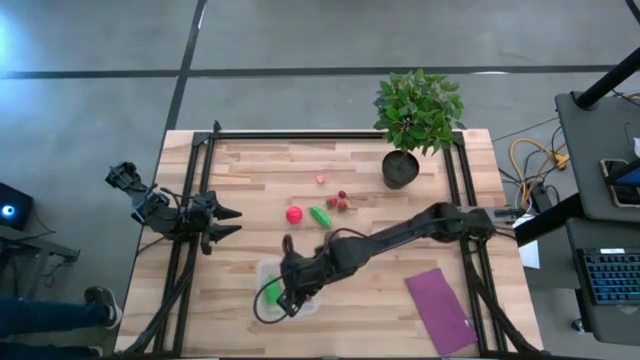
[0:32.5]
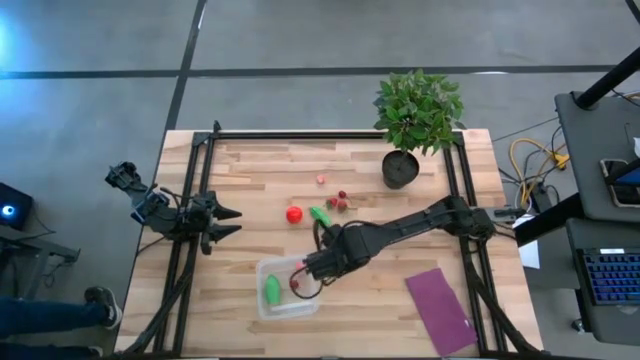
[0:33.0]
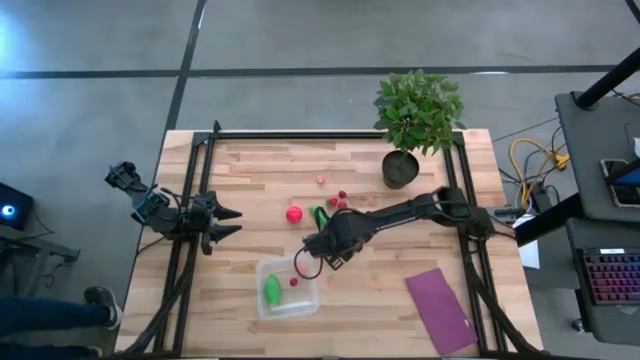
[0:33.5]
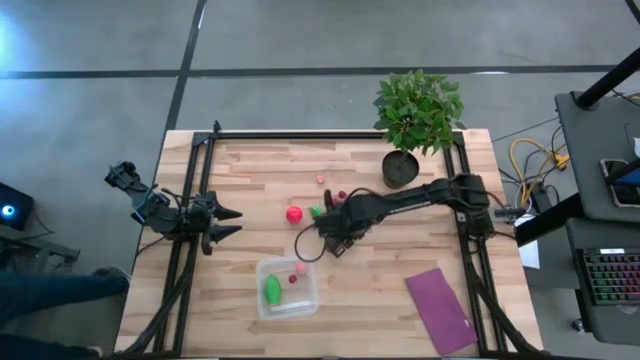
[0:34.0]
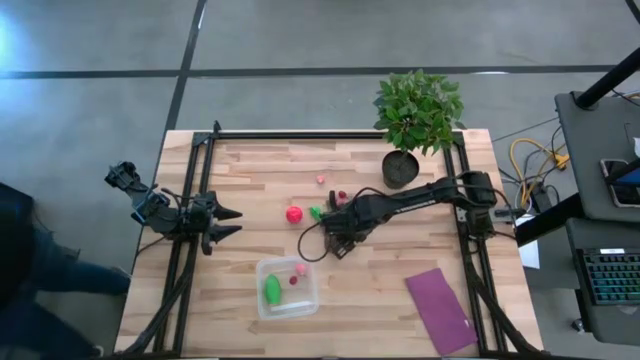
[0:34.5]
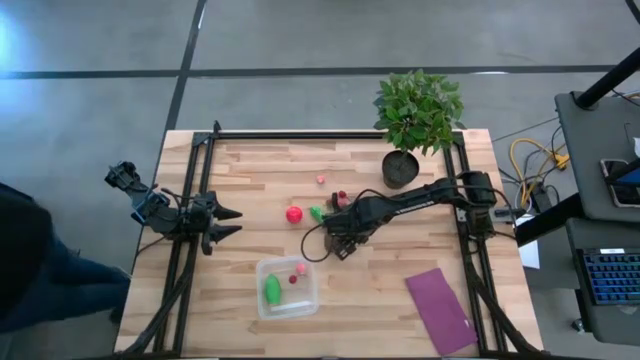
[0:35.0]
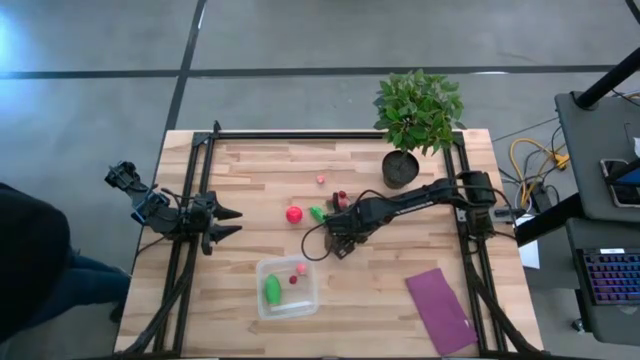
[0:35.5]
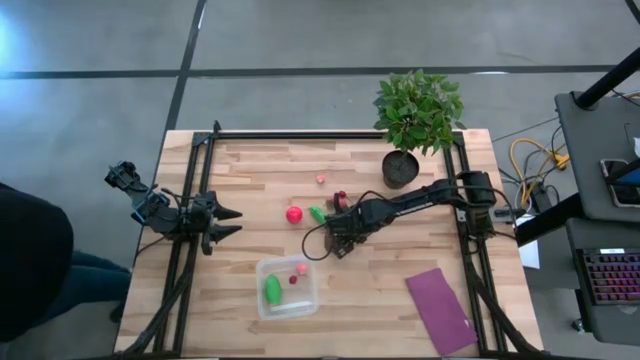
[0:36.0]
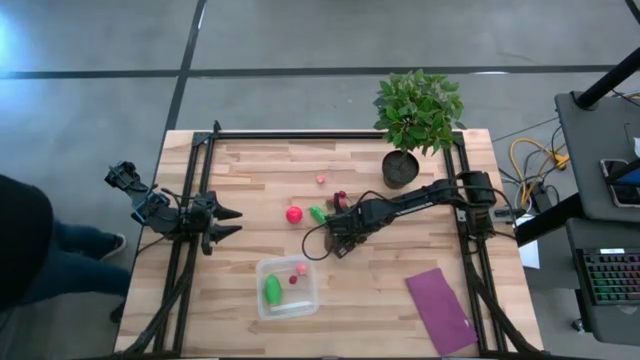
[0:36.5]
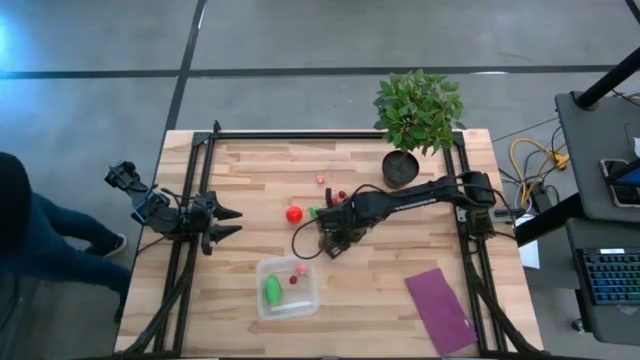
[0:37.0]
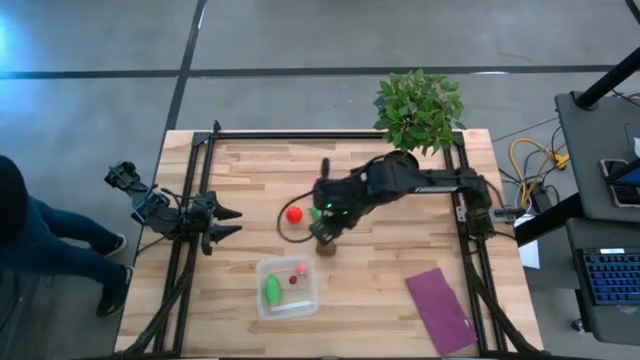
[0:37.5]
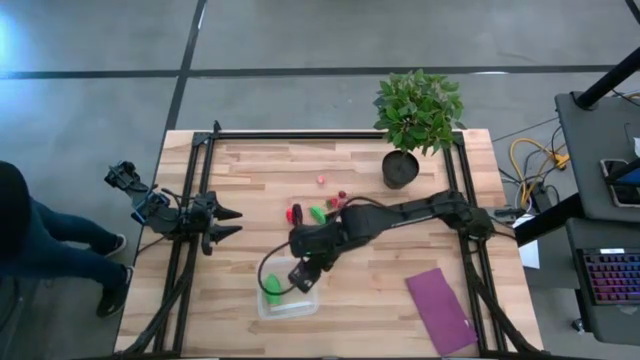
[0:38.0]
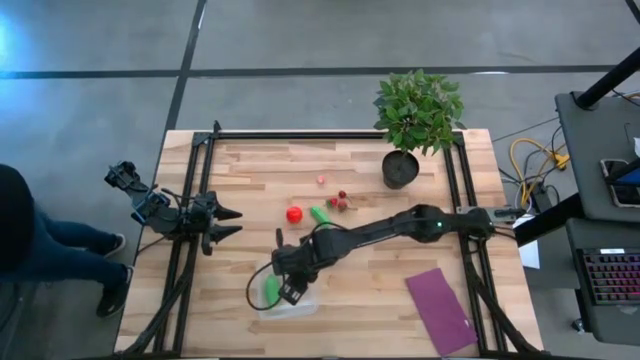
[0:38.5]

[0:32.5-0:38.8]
Task: Pick and placing Produce into tupperware
Put the bottom peach into the transparent bin

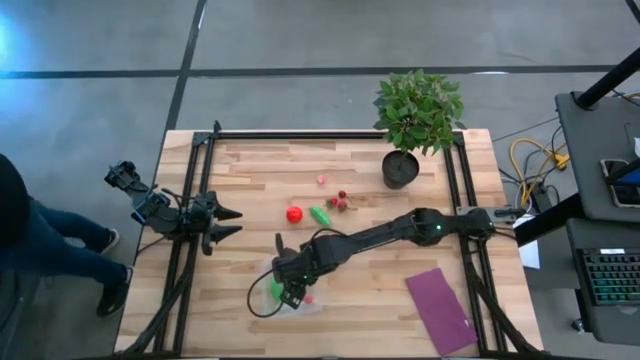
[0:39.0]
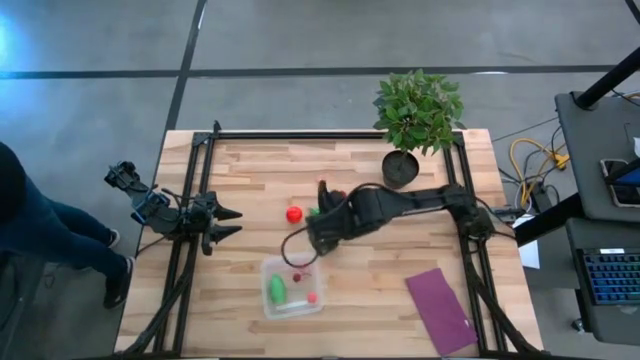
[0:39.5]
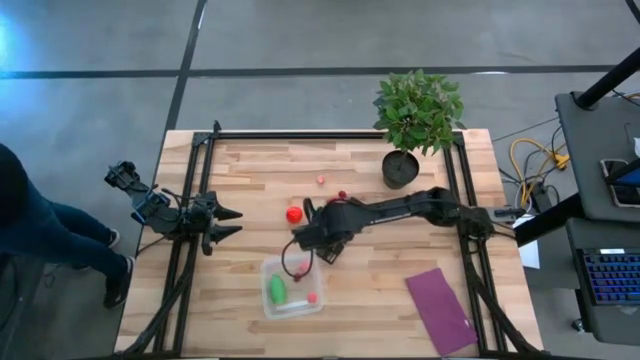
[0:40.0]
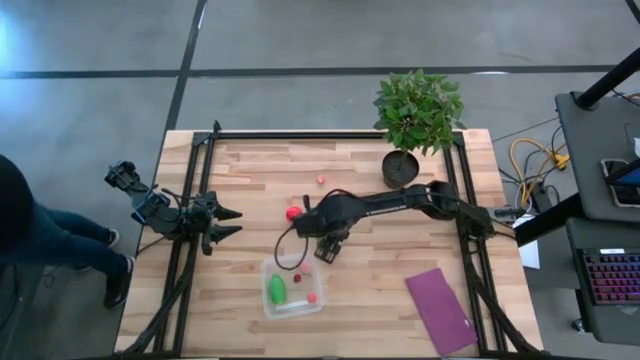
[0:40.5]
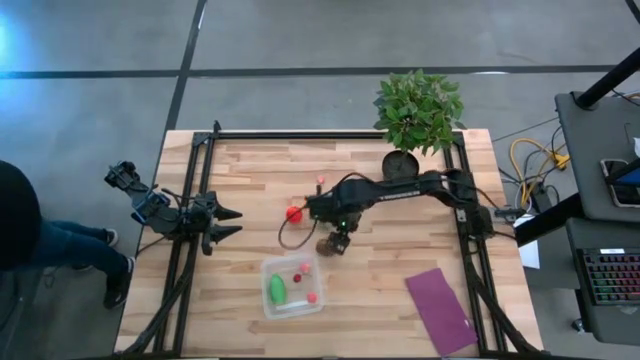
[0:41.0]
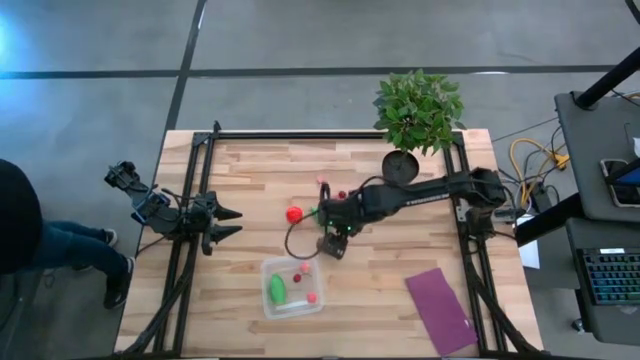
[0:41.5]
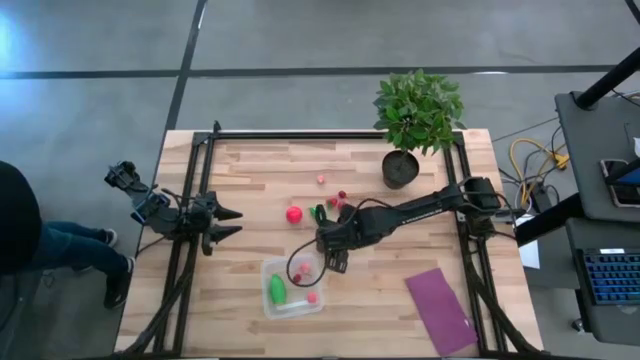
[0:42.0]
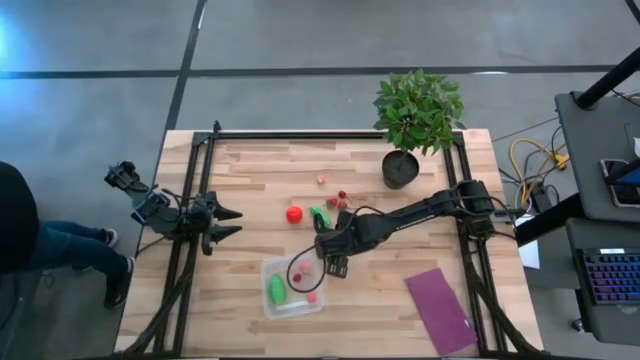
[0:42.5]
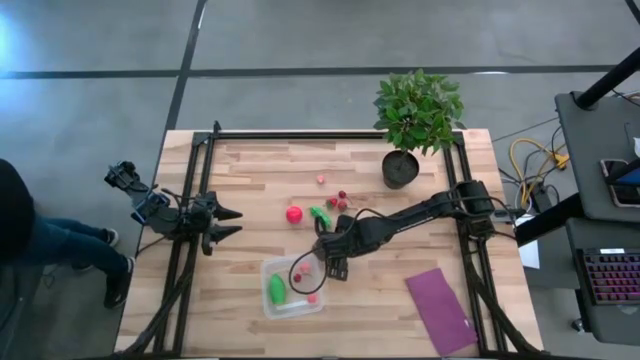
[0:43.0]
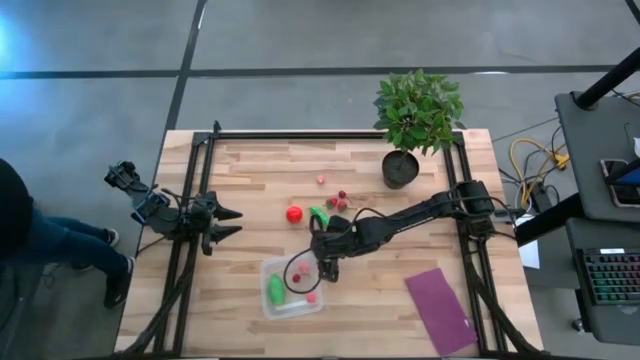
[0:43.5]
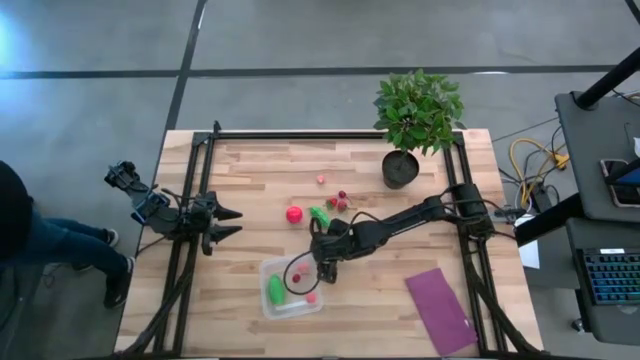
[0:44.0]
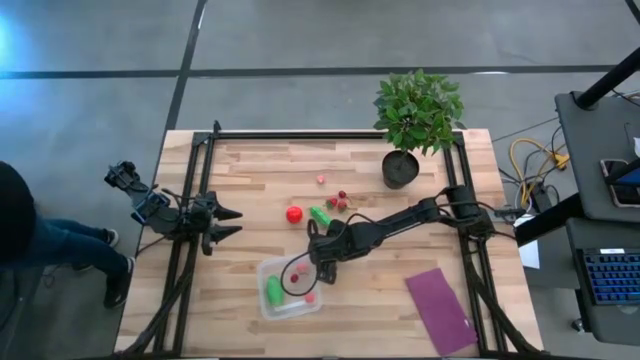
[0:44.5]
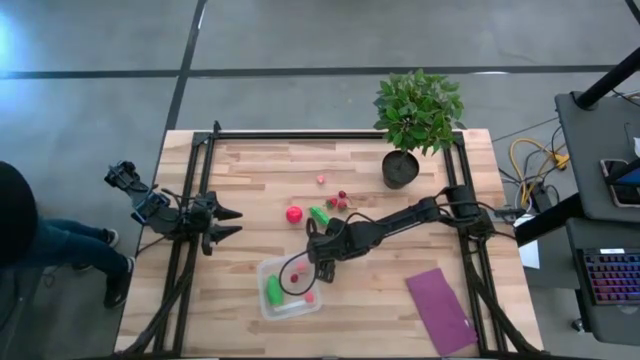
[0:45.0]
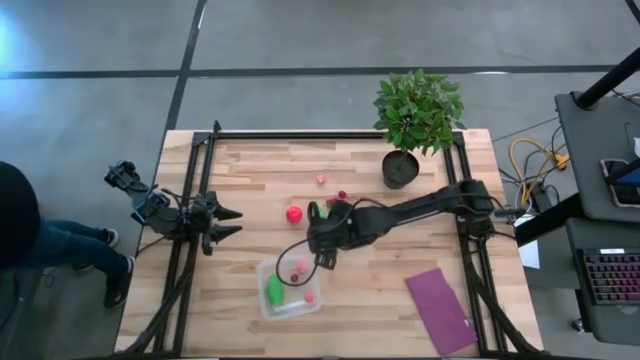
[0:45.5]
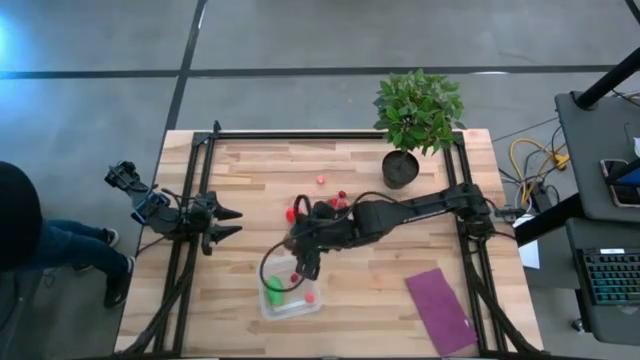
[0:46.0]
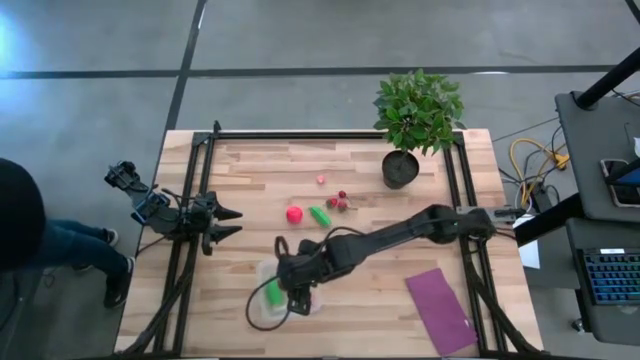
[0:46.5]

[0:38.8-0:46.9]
Put the kiwi into the transparent bin

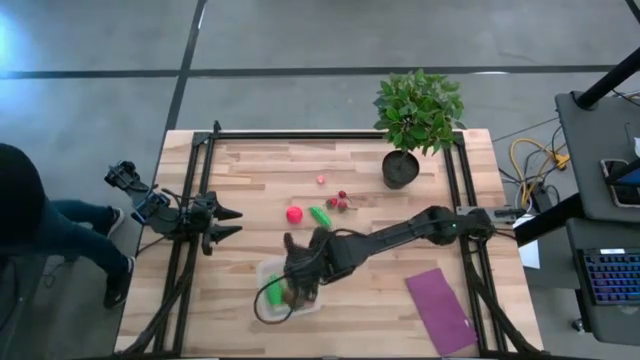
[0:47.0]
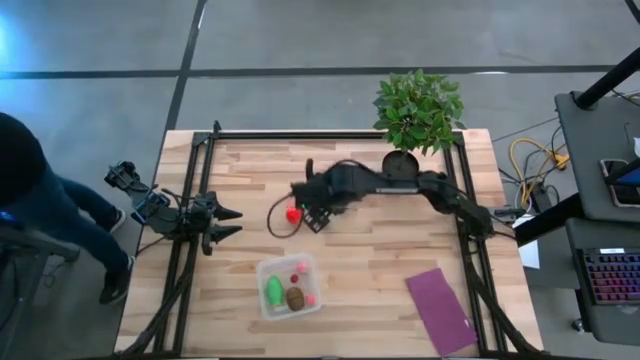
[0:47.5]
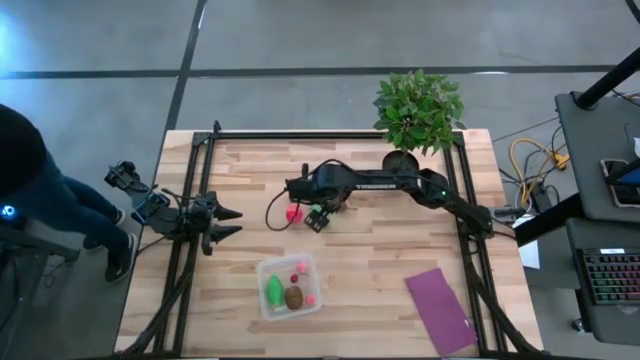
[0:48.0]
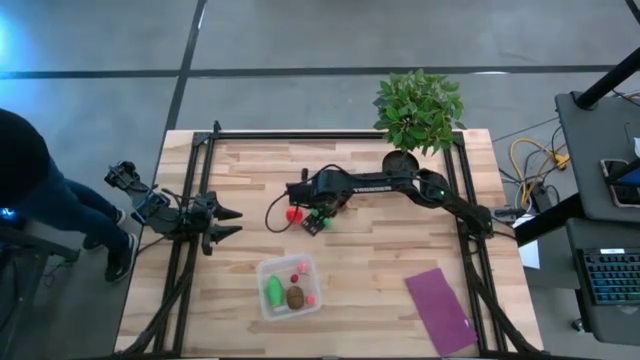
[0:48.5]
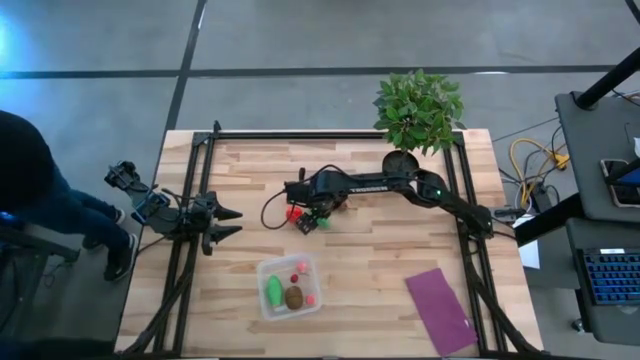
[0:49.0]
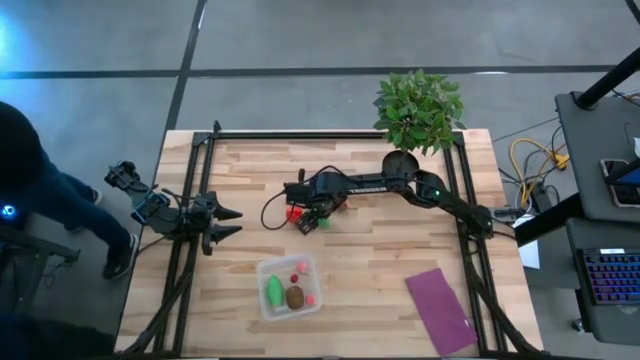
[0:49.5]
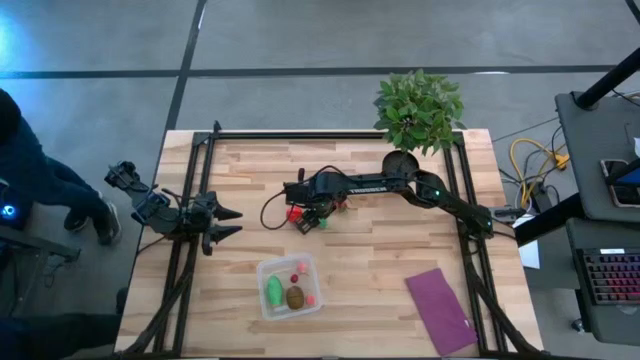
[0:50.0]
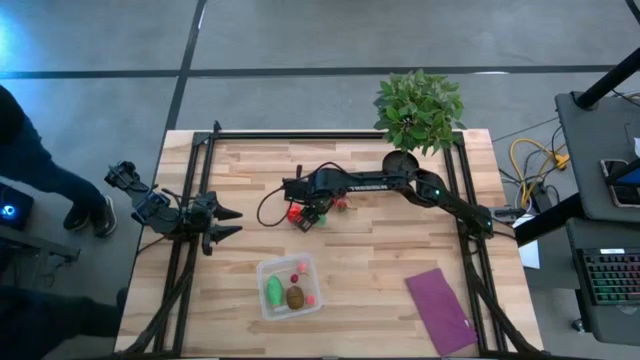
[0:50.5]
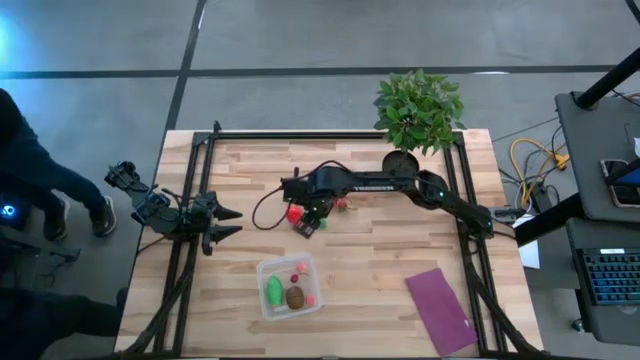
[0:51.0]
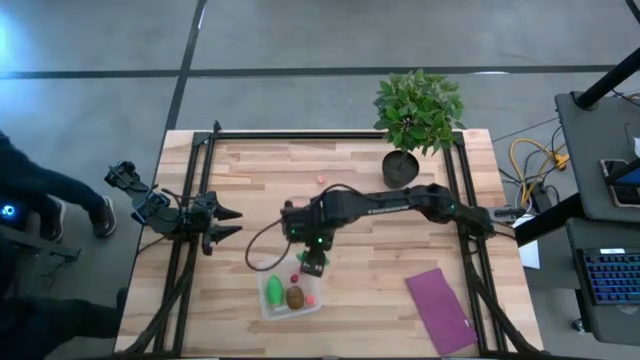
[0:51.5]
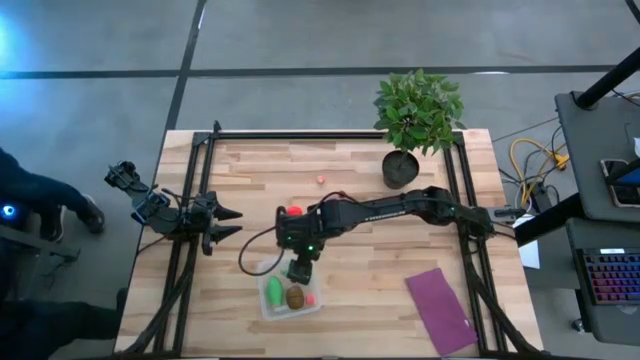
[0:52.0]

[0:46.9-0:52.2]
Put the green peas into the transparent bin

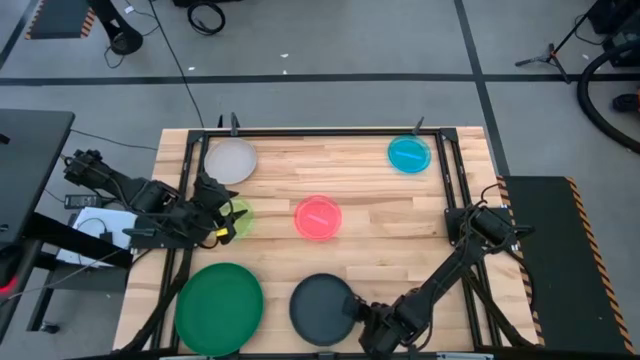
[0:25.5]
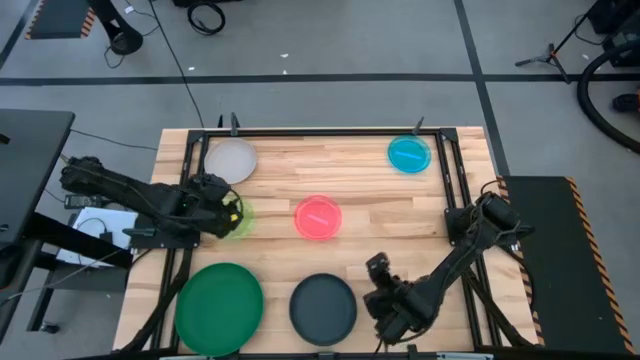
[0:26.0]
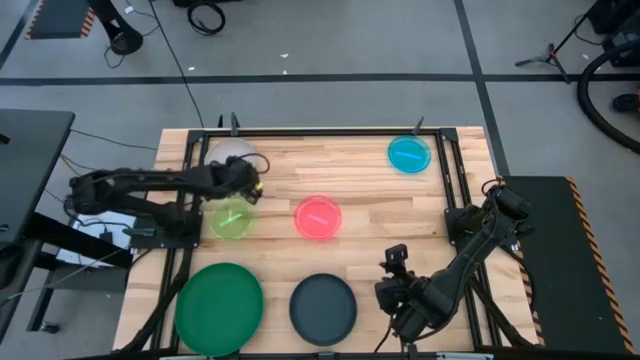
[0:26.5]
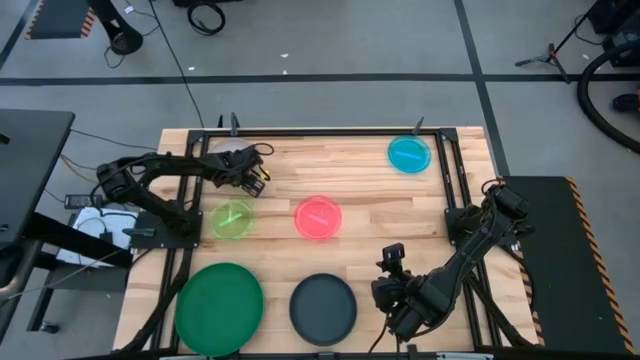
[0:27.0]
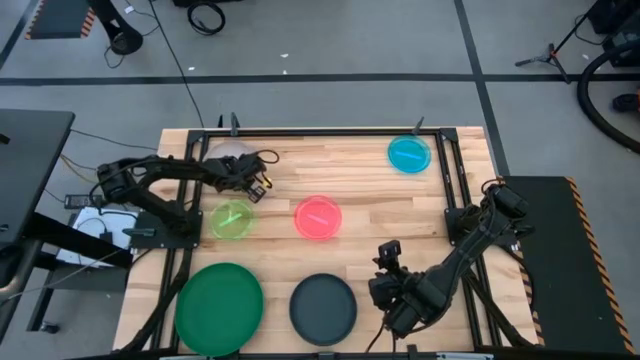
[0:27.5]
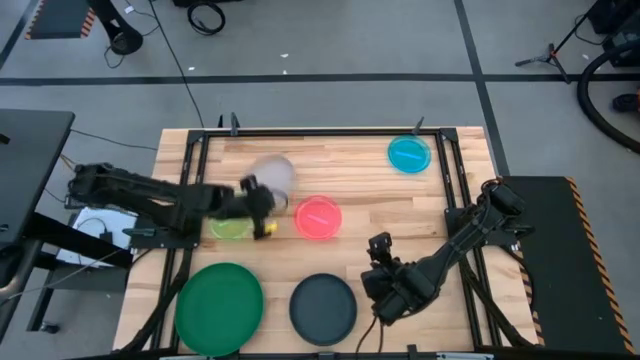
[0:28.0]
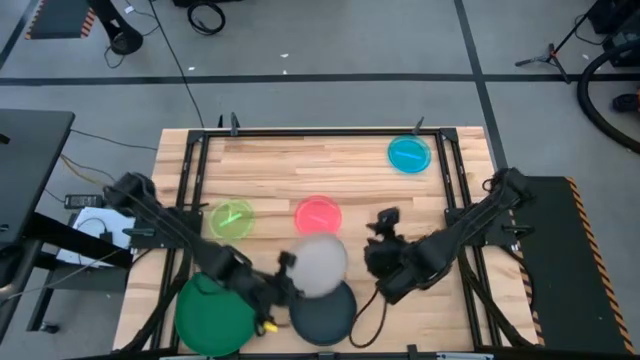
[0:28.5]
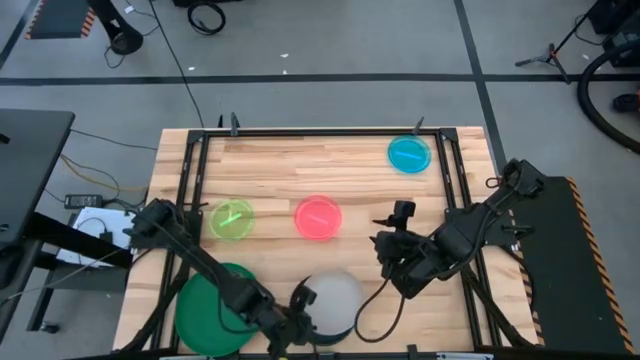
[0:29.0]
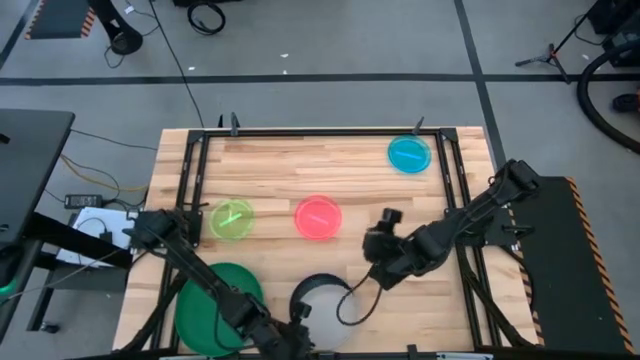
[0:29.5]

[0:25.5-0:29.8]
Task: Stack plastic plates
Stack the gray plate on top of the dark blue plate
